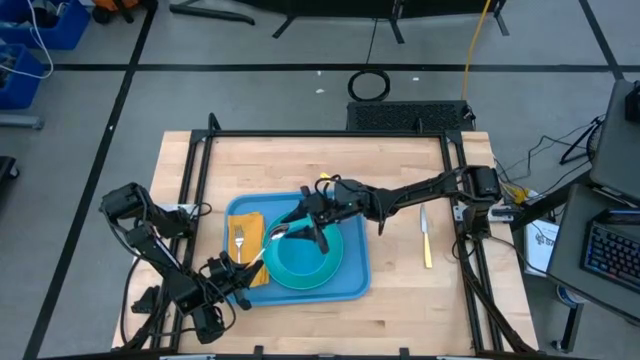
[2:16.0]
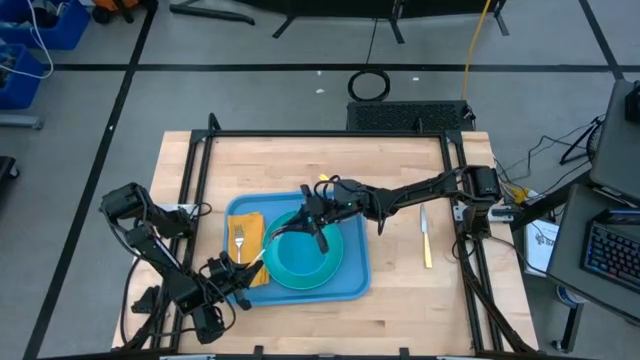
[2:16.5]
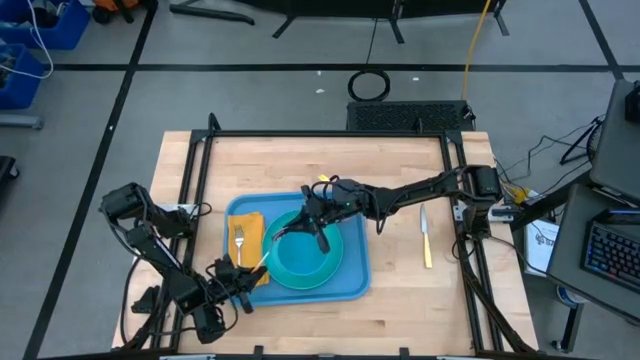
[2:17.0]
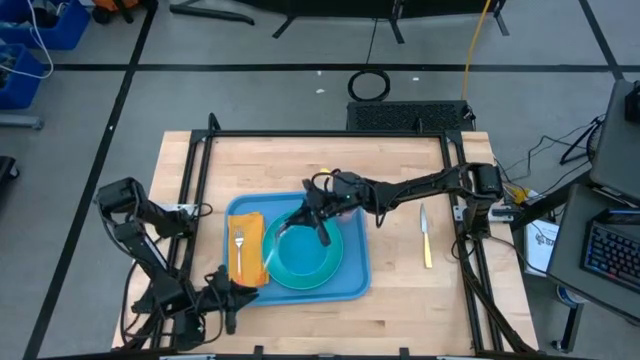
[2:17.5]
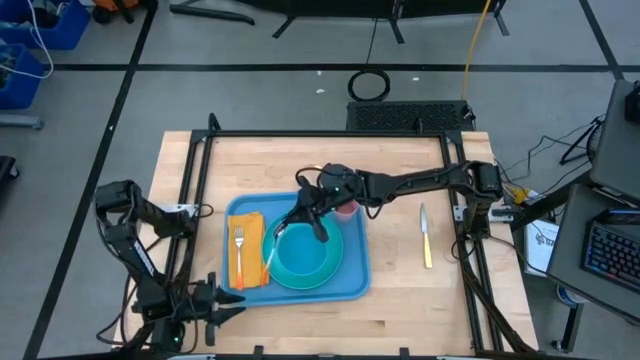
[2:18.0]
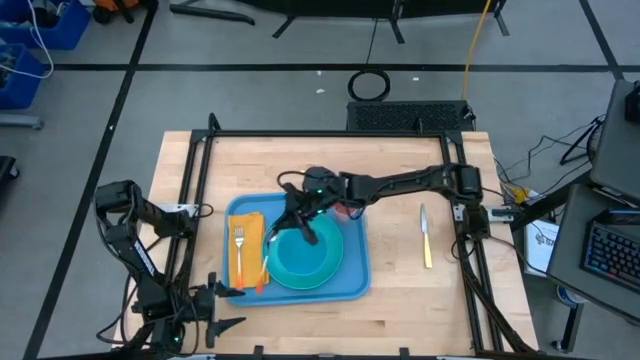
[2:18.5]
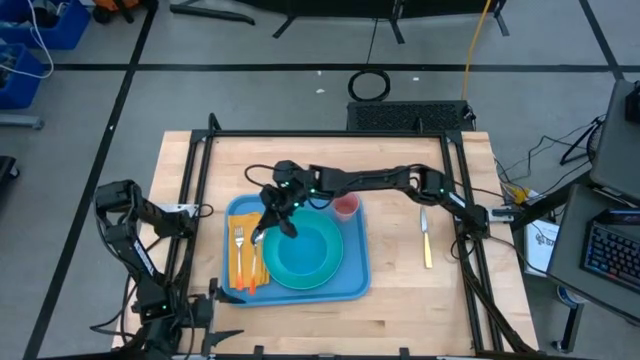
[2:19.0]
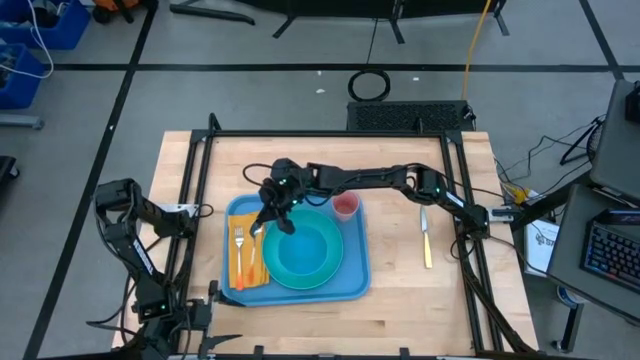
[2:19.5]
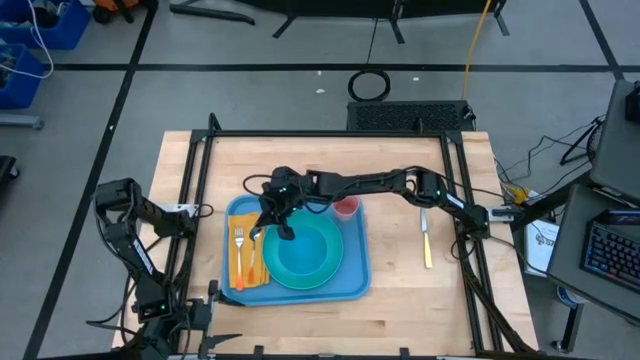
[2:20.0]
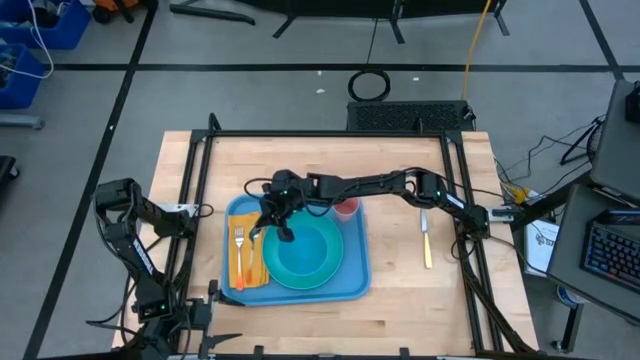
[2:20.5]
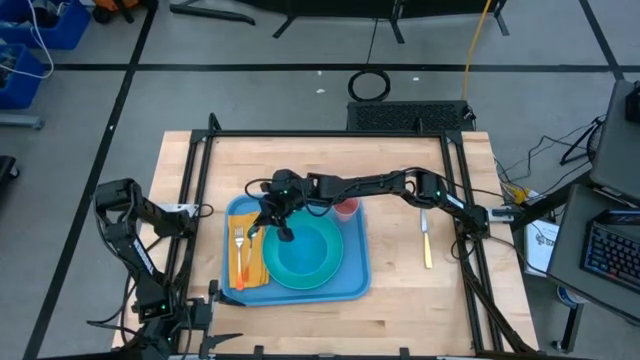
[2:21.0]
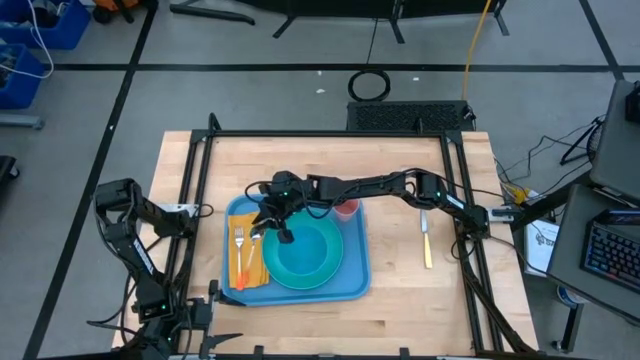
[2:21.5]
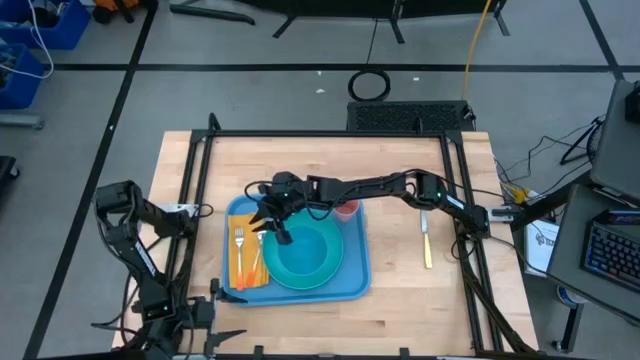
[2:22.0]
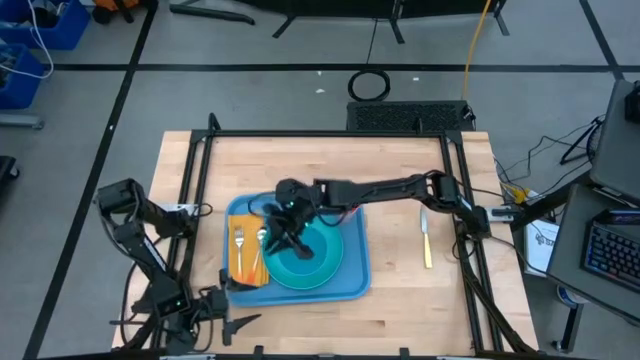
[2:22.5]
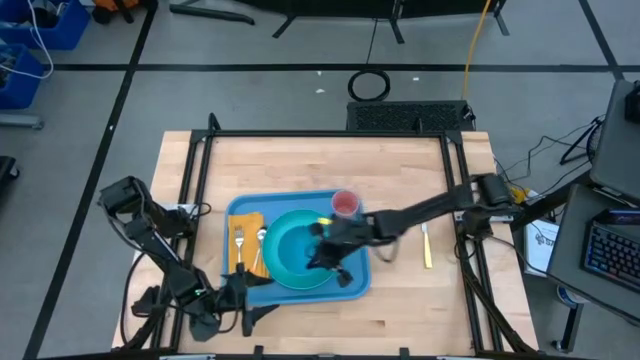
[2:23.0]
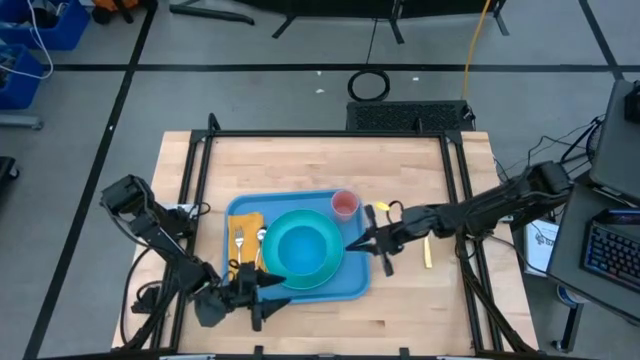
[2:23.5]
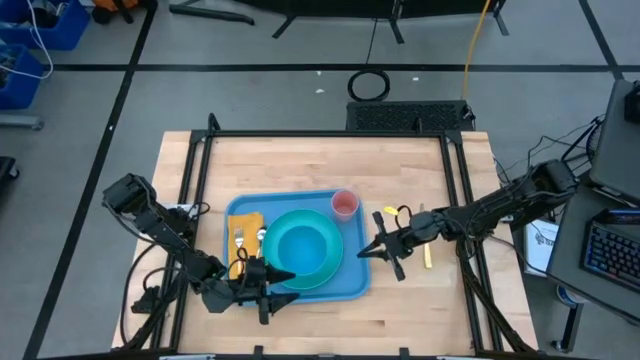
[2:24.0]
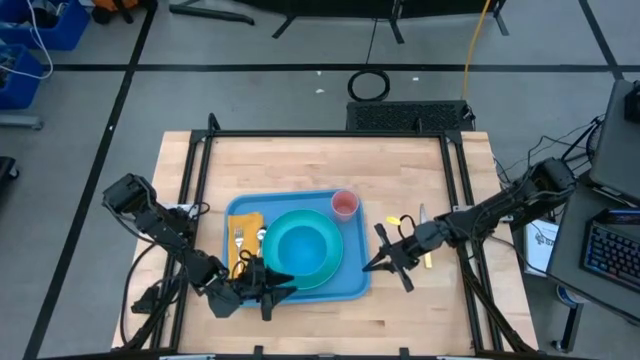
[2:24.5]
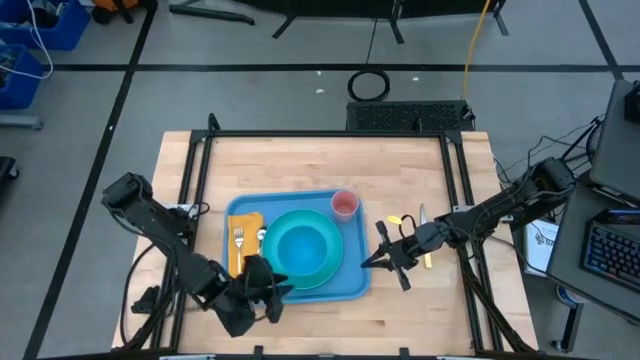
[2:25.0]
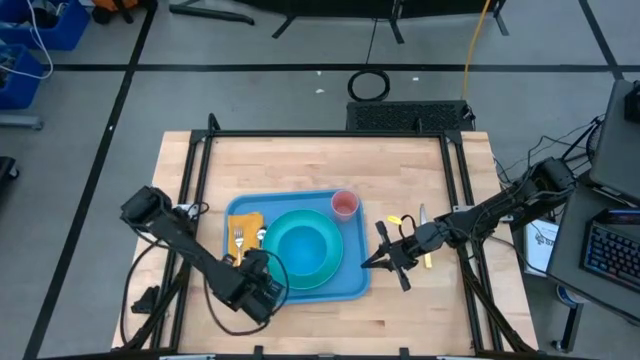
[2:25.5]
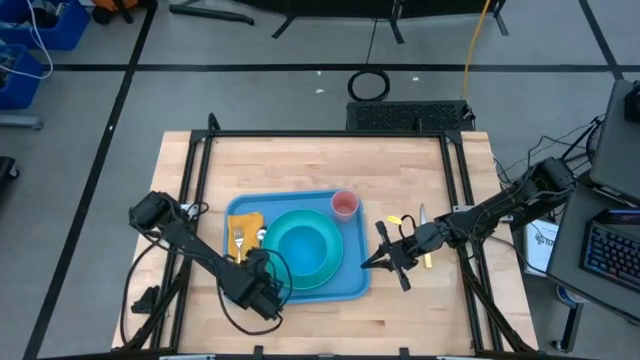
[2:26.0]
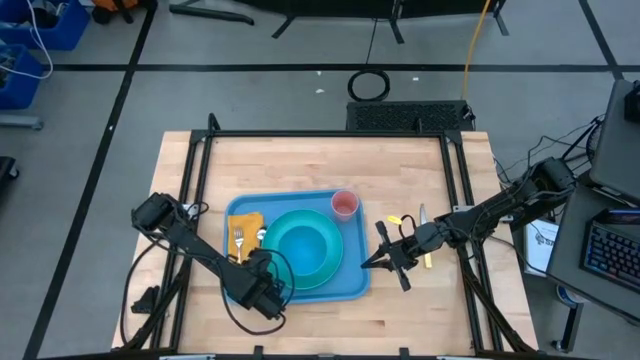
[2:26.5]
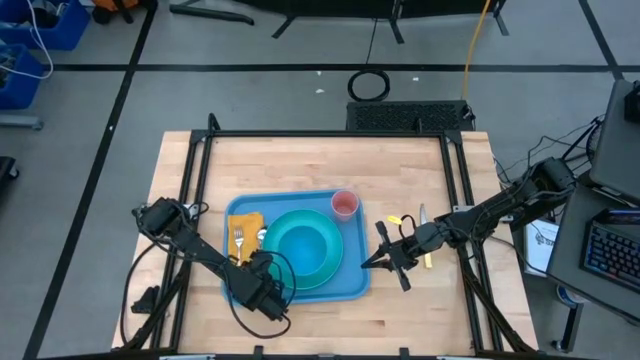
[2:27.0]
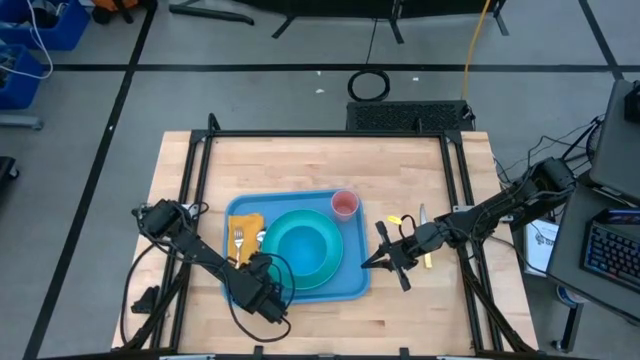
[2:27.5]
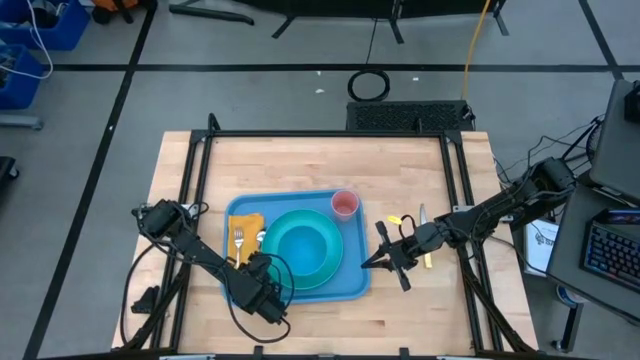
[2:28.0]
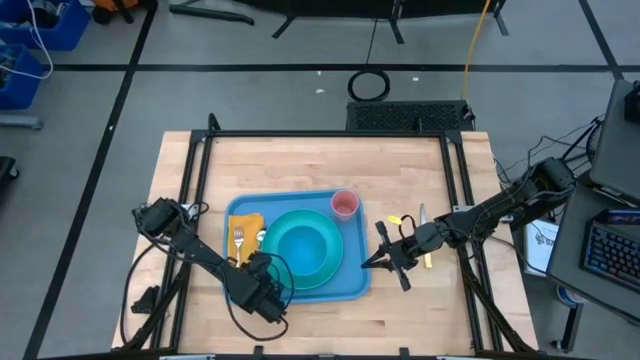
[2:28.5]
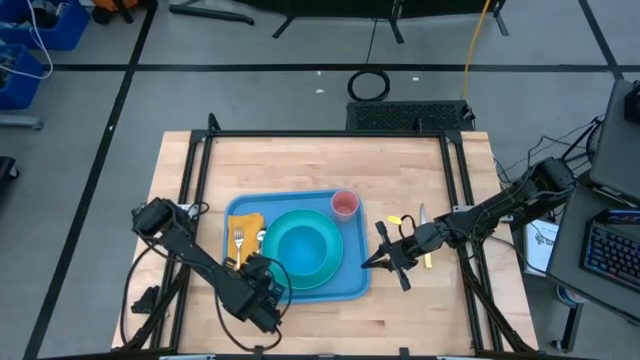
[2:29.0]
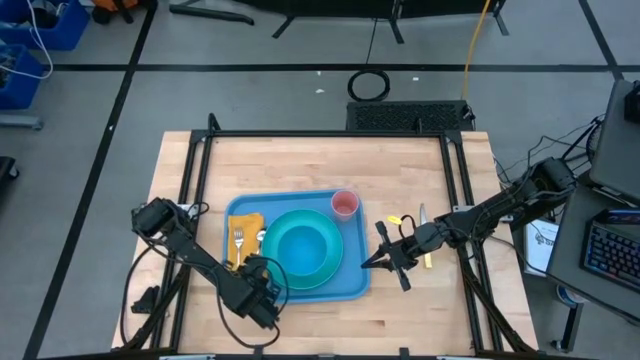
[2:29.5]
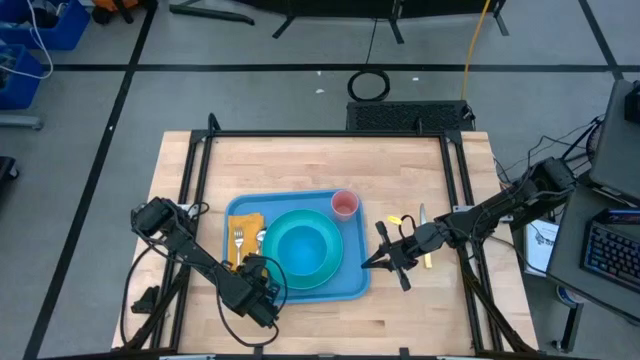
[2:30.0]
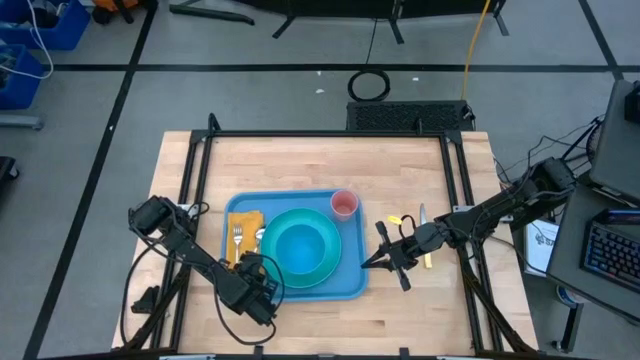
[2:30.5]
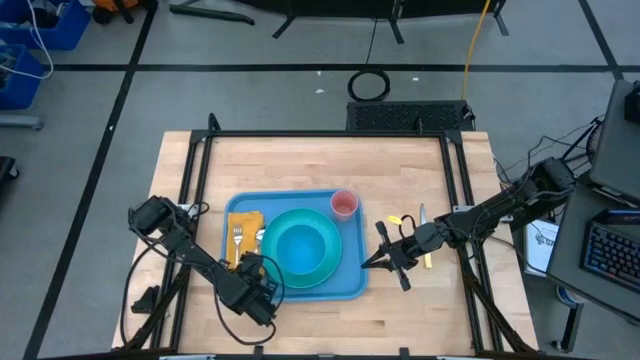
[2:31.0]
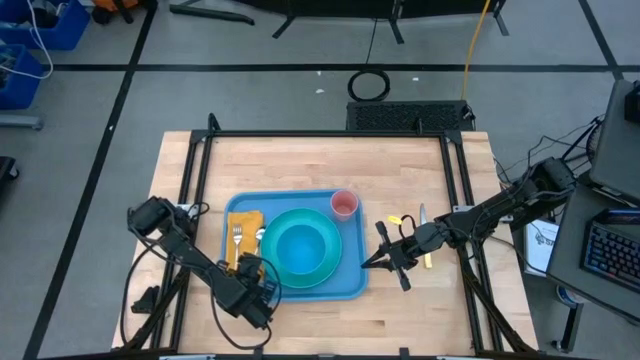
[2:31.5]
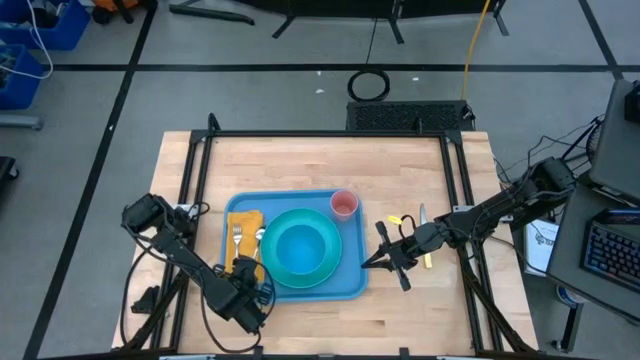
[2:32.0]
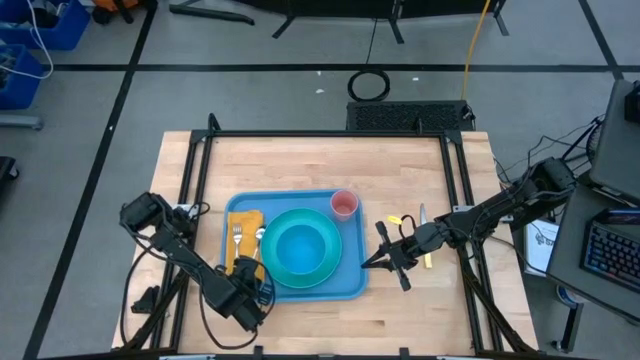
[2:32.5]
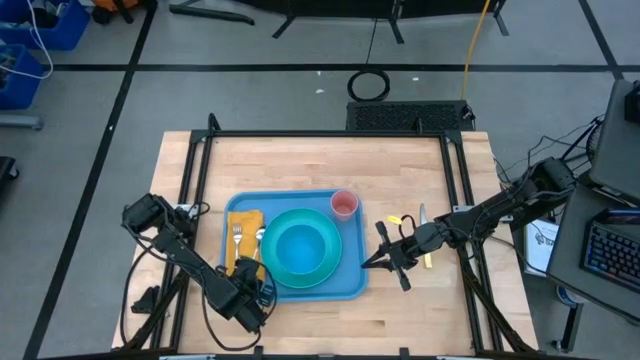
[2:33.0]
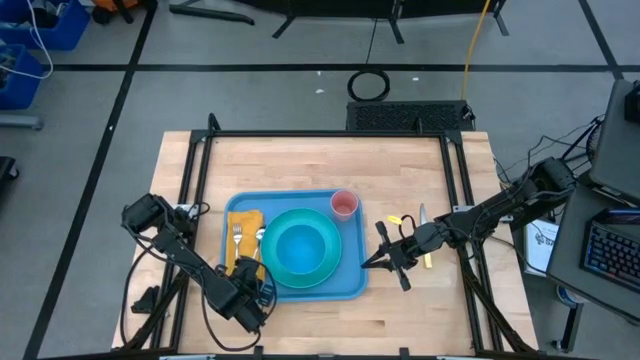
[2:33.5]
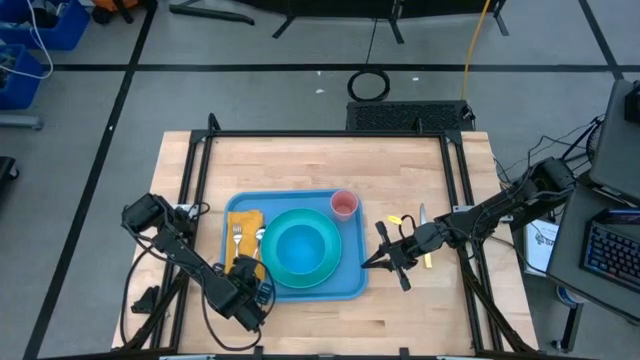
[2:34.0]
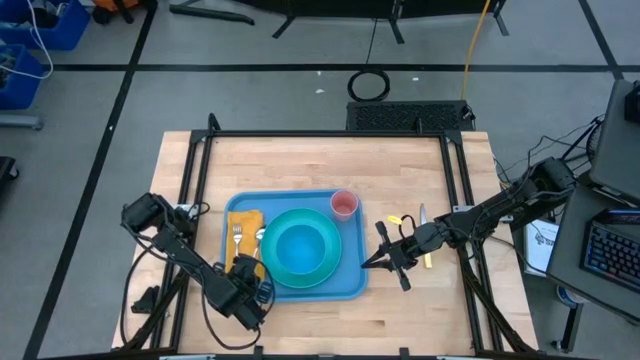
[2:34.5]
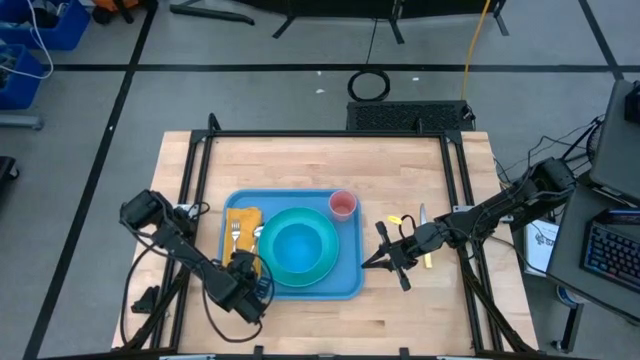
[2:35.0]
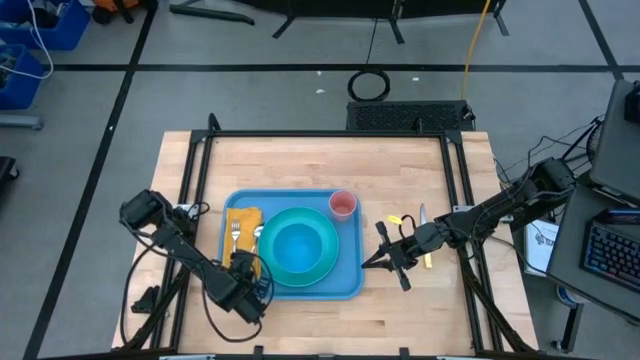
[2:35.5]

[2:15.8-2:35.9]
Task: Set up tray
Put the orange spoon on the blue serving tray to the right of the orange fork
